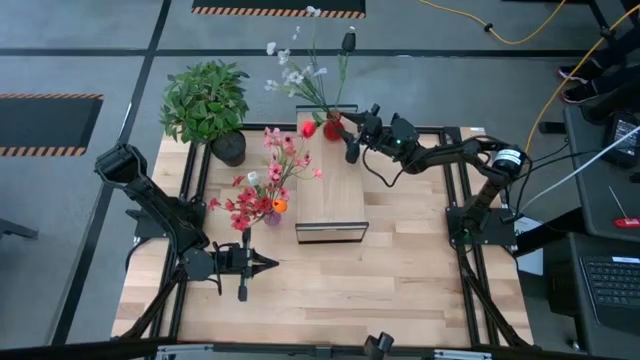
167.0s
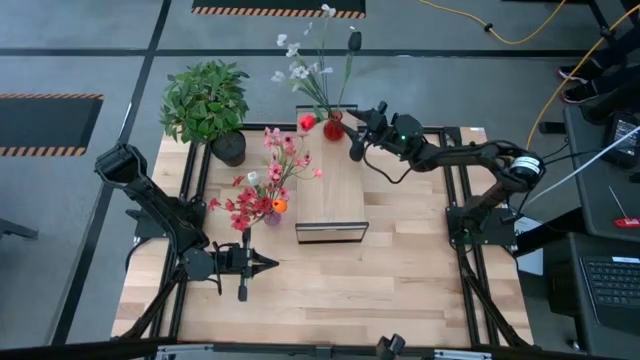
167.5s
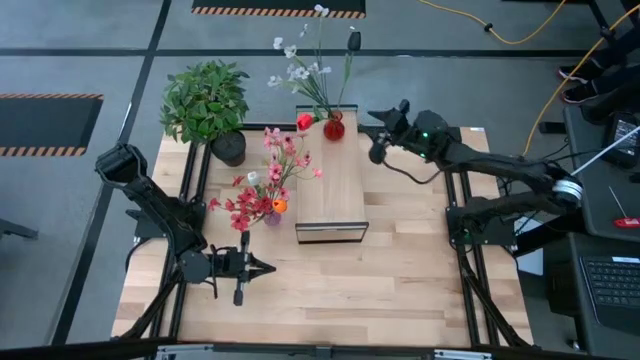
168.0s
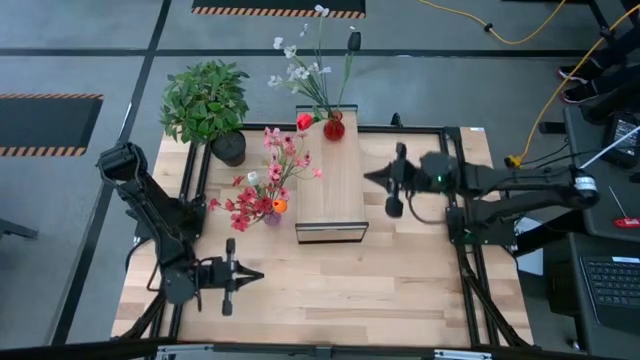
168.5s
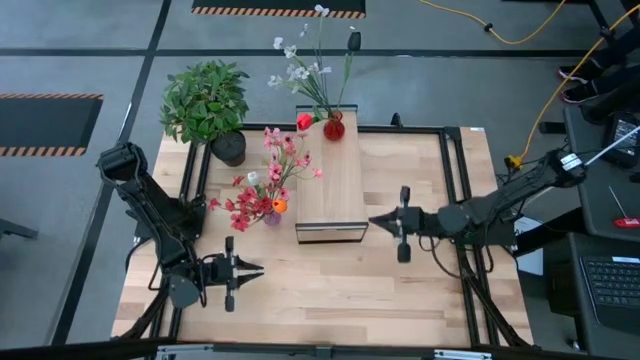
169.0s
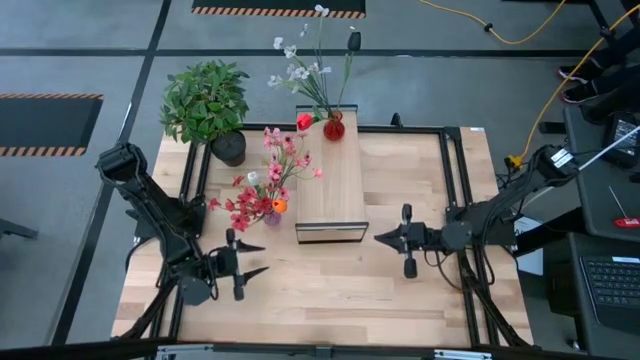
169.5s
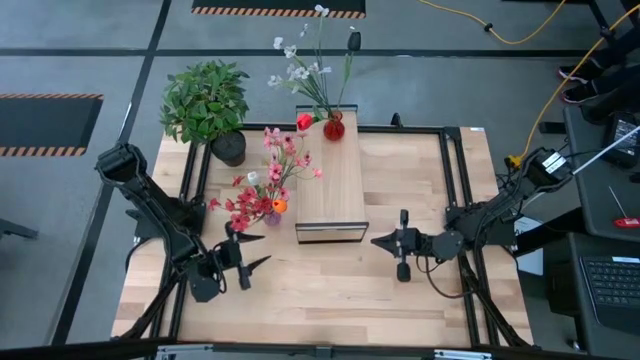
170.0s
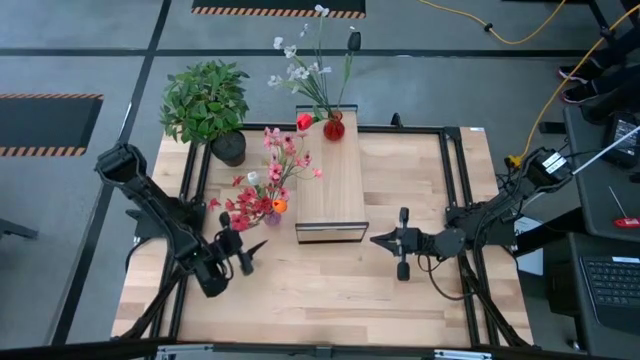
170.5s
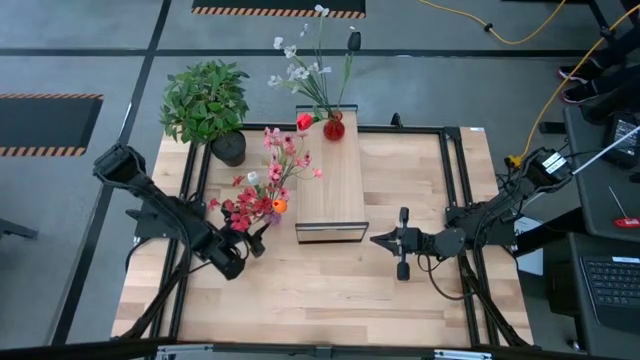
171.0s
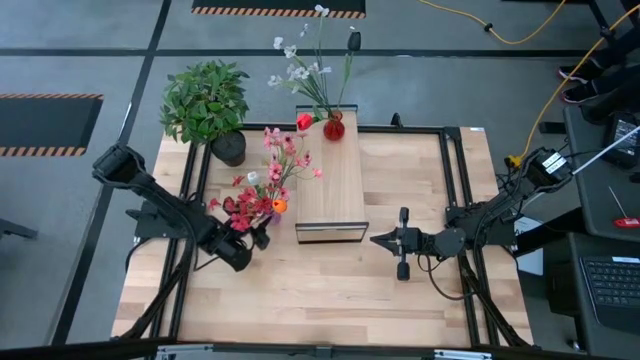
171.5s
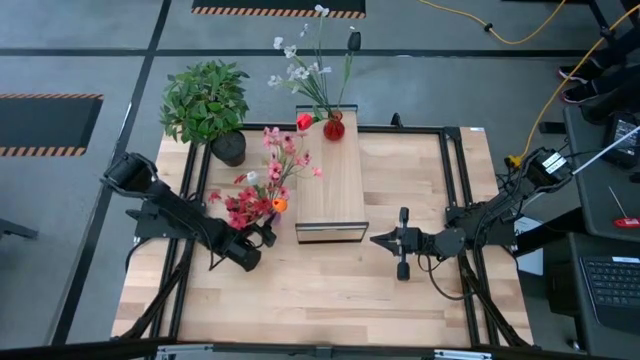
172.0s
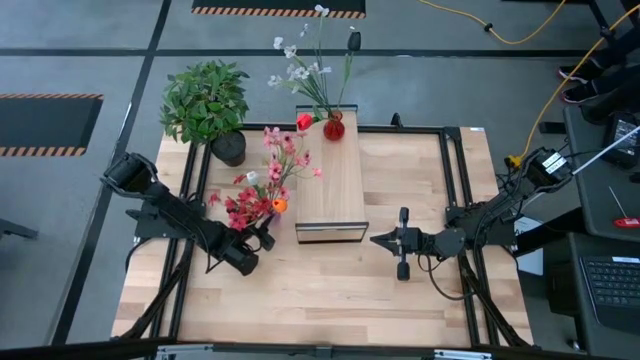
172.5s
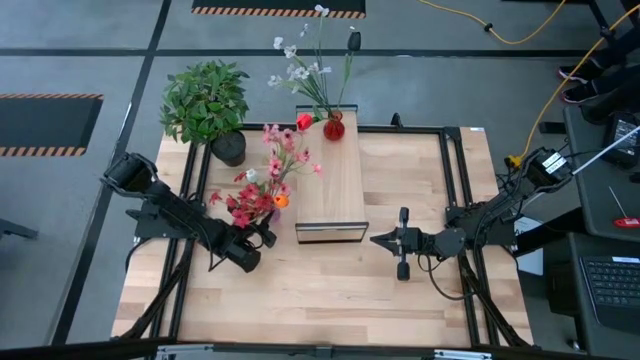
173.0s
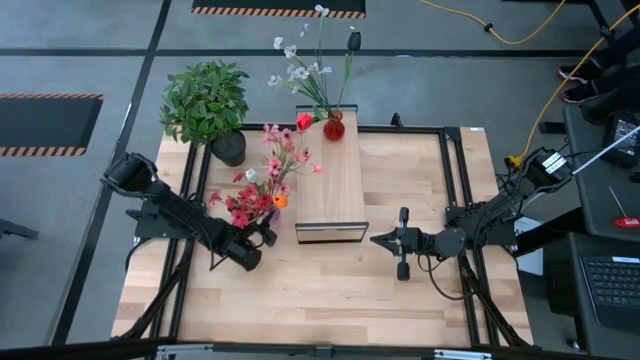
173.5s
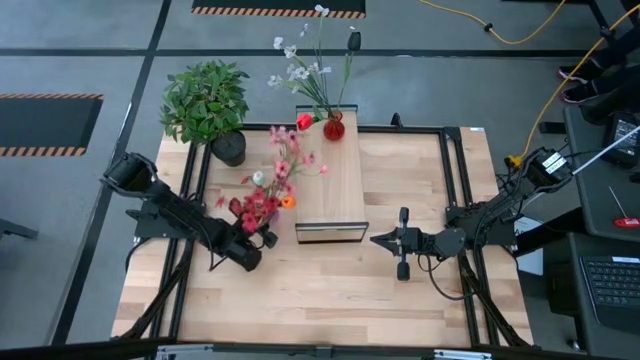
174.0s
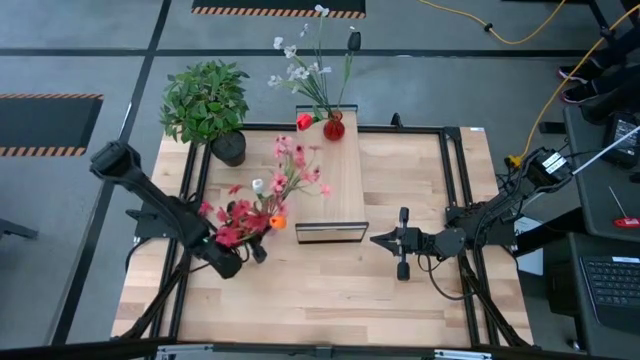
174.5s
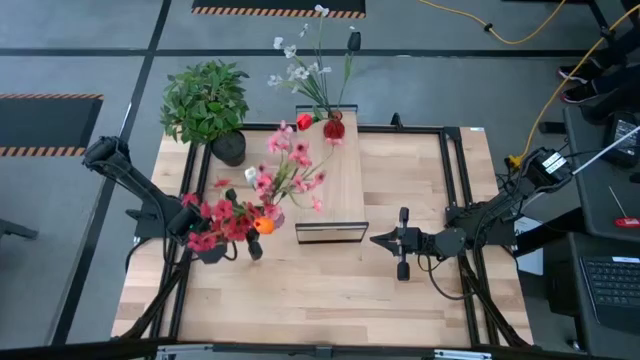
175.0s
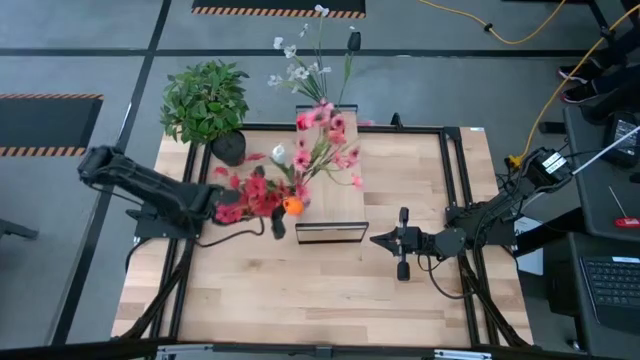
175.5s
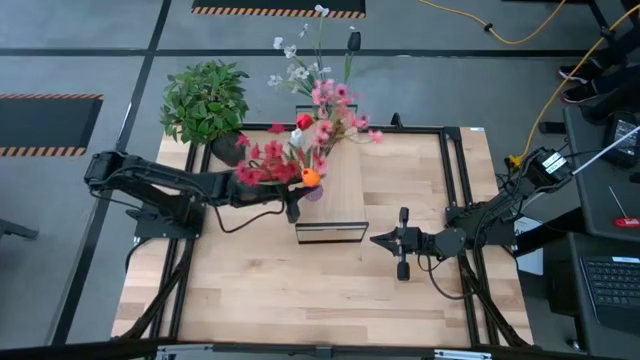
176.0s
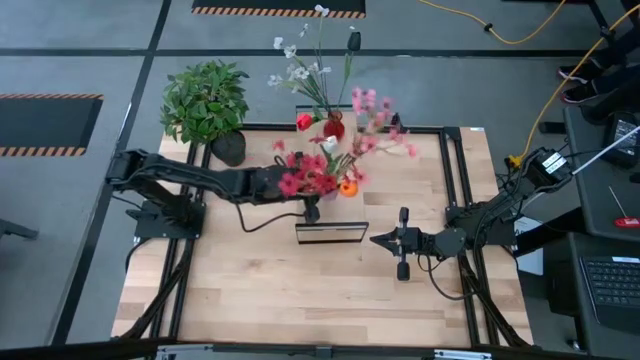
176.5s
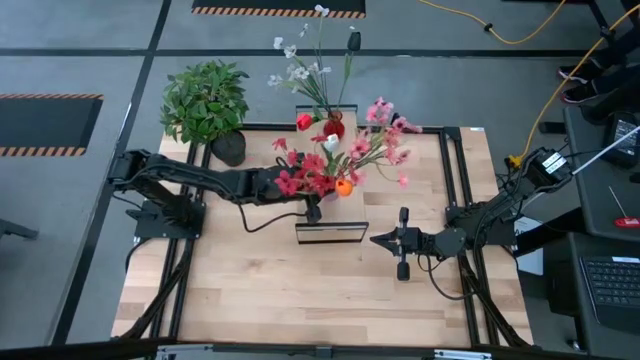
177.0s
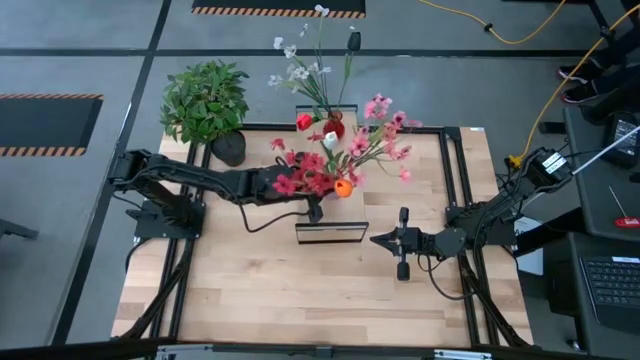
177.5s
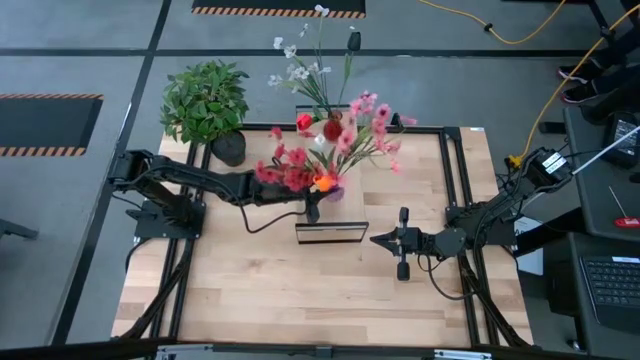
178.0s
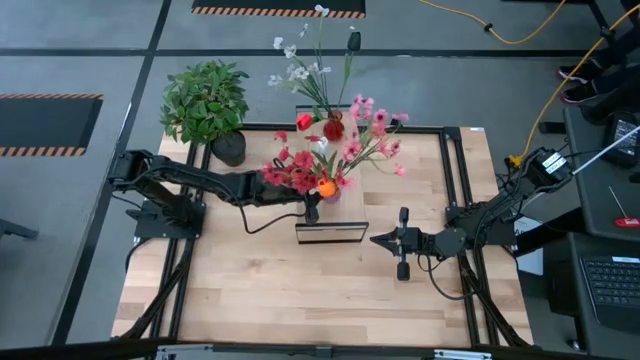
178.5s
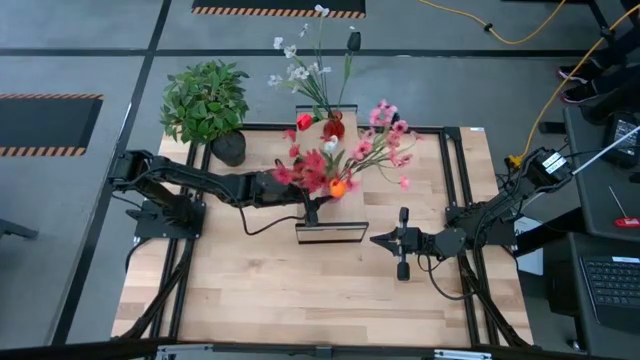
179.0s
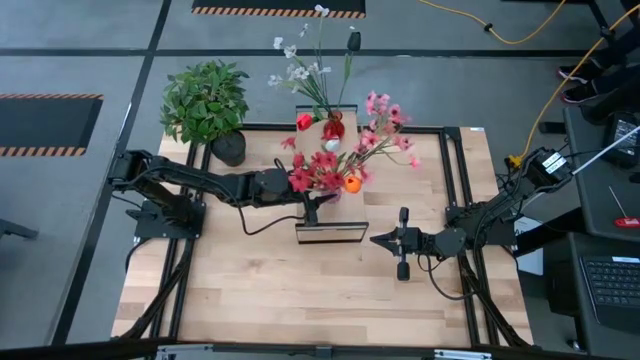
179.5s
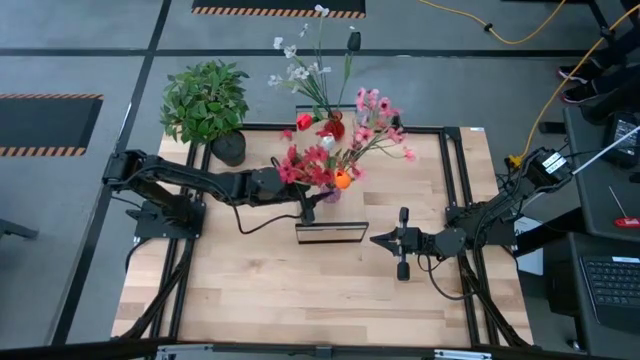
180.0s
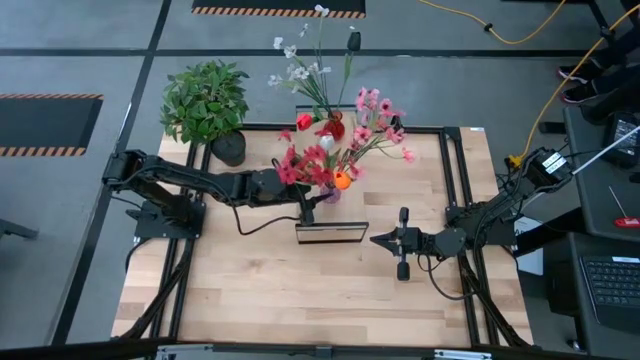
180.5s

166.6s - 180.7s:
Task: Pick and place flowers into a vace then onto a shelf
Put the violet vase on the shelf

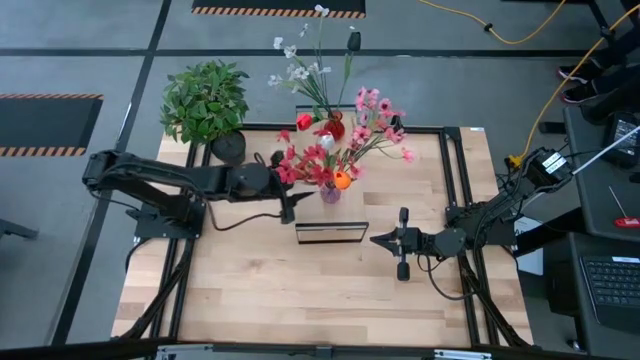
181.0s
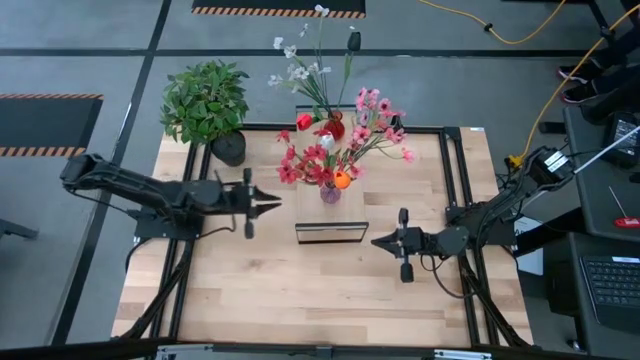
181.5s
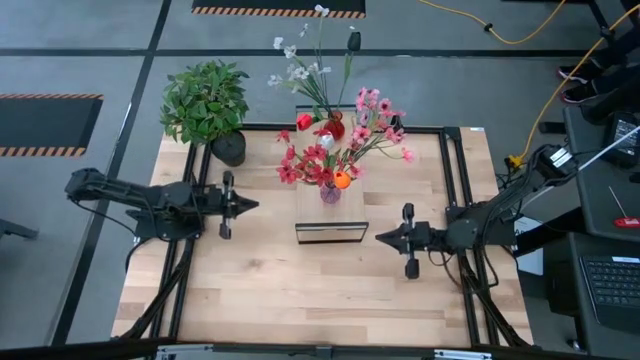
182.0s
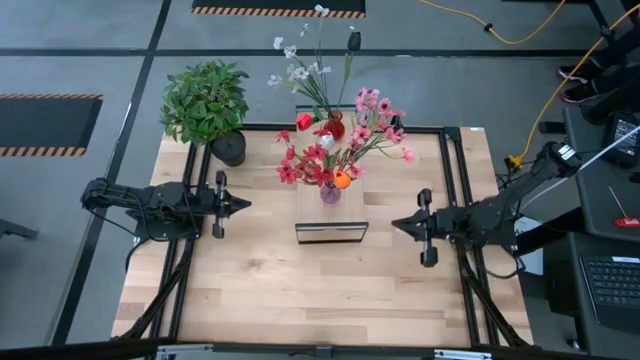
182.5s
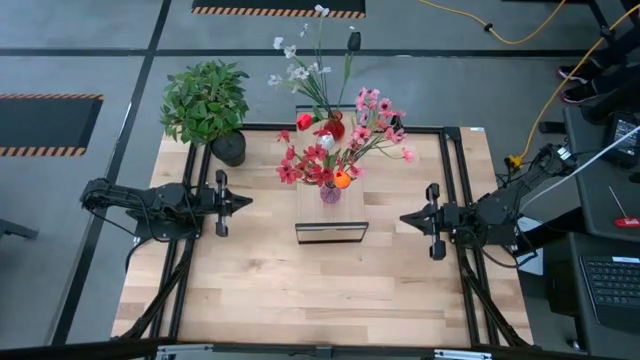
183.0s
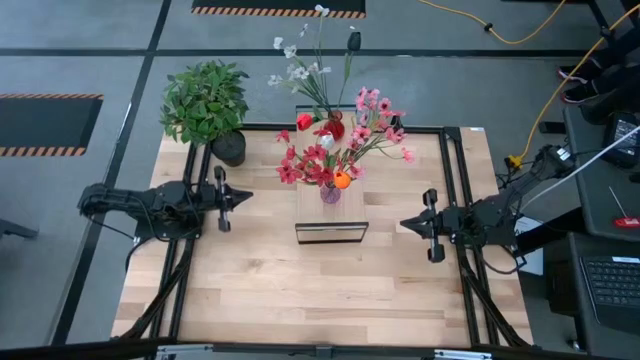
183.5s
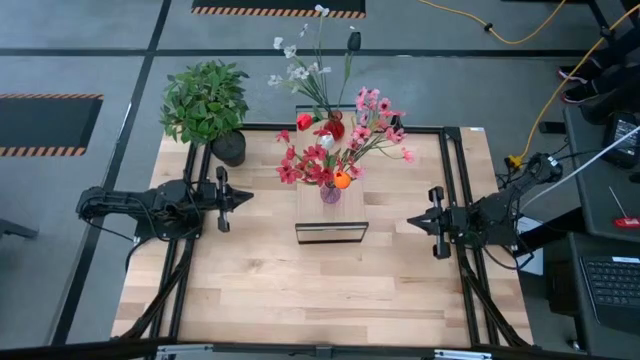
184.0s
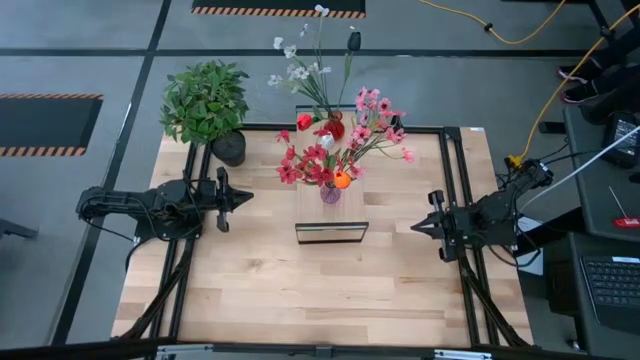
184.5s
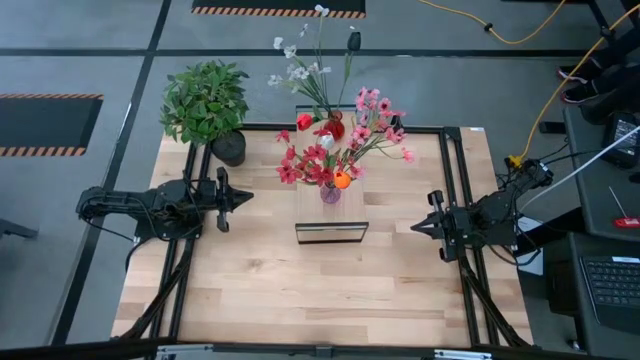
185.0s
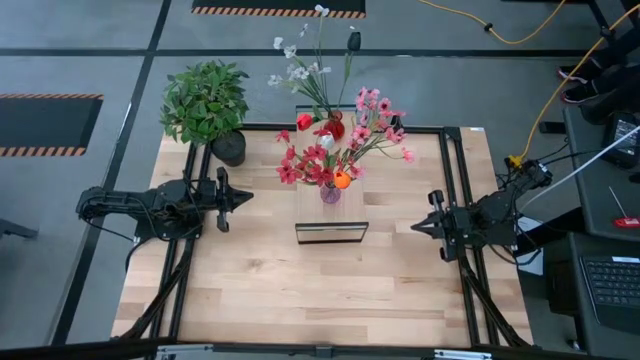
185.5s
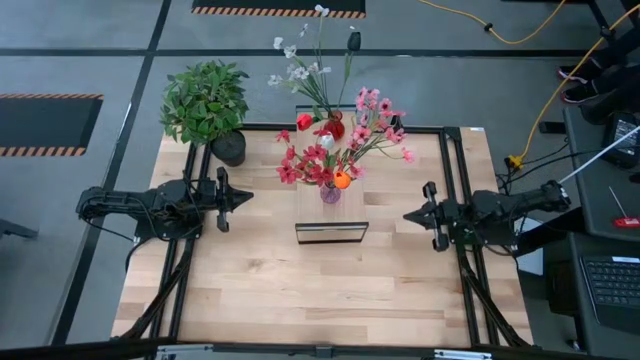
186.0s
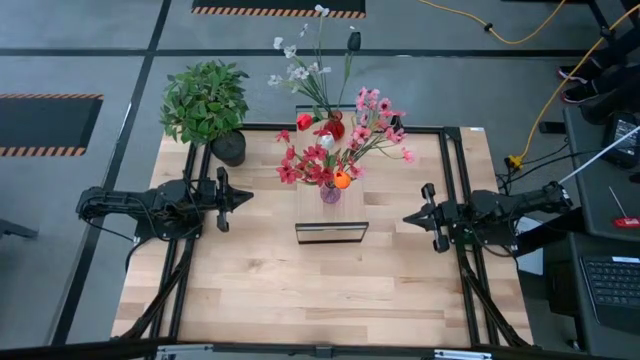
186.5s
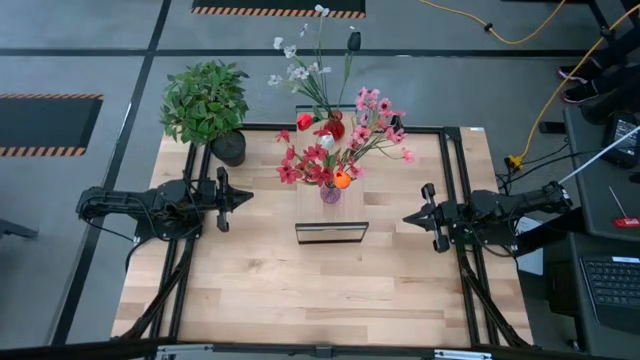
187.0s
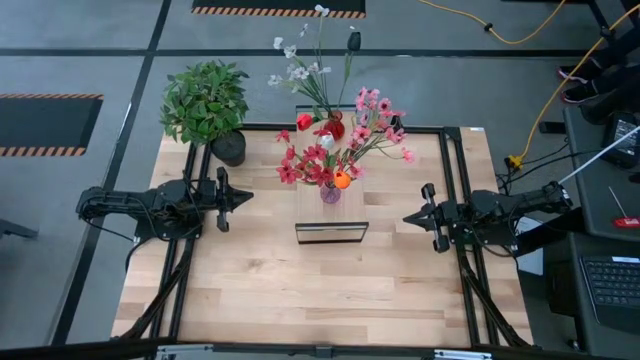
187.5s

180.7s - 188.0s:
Return to Home Position
